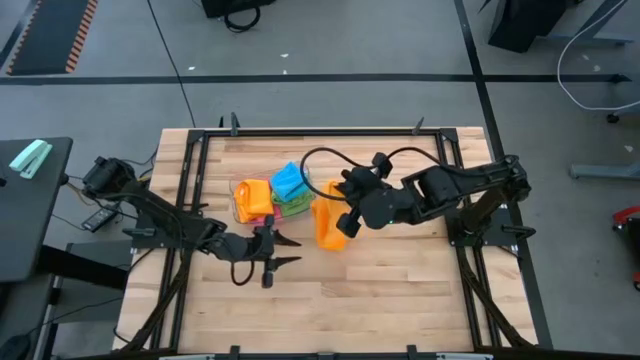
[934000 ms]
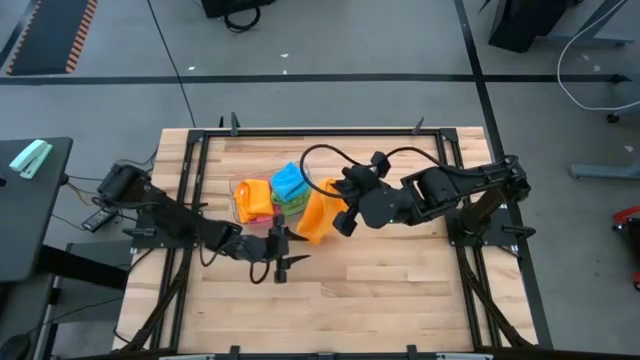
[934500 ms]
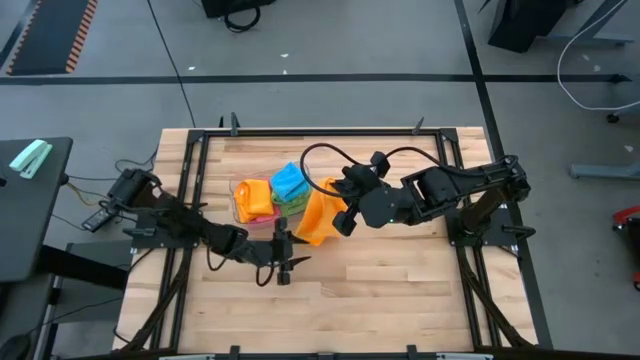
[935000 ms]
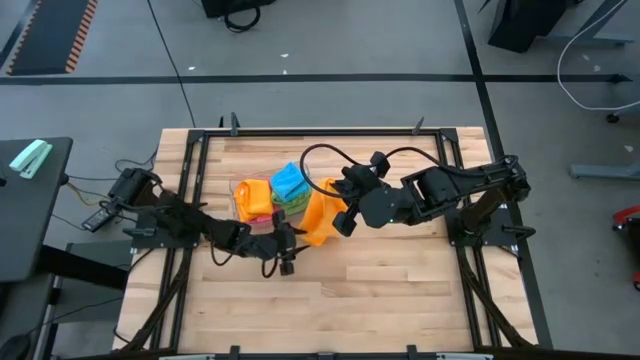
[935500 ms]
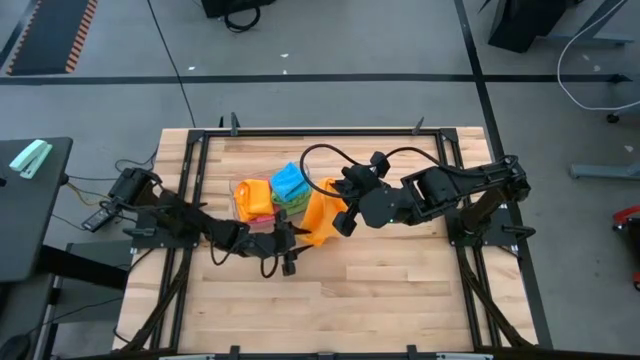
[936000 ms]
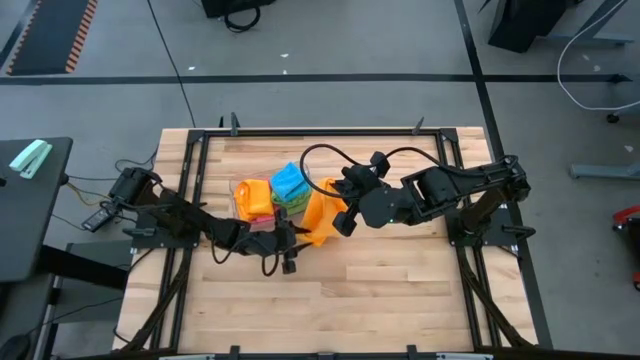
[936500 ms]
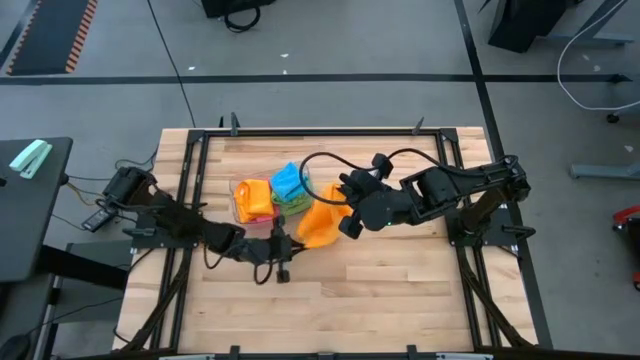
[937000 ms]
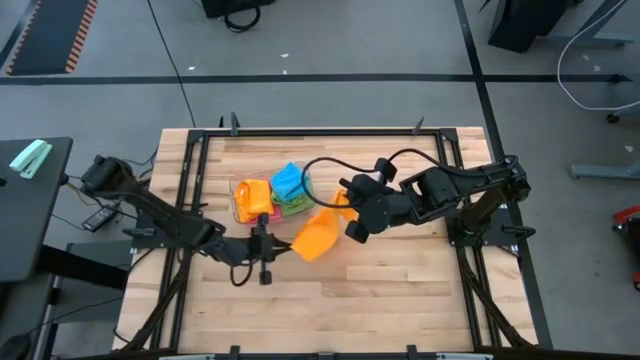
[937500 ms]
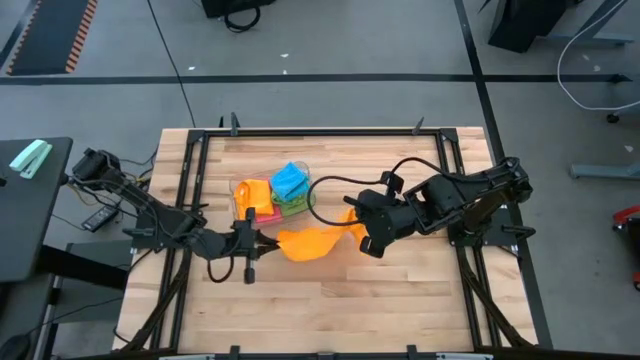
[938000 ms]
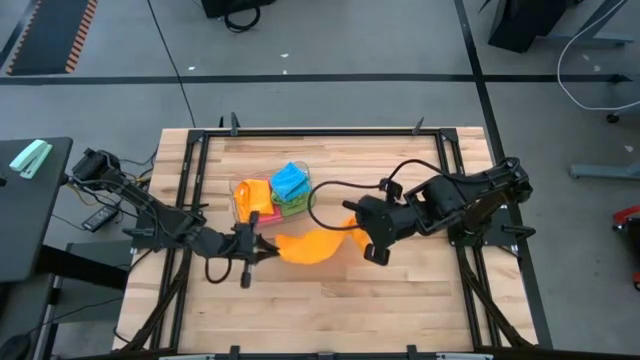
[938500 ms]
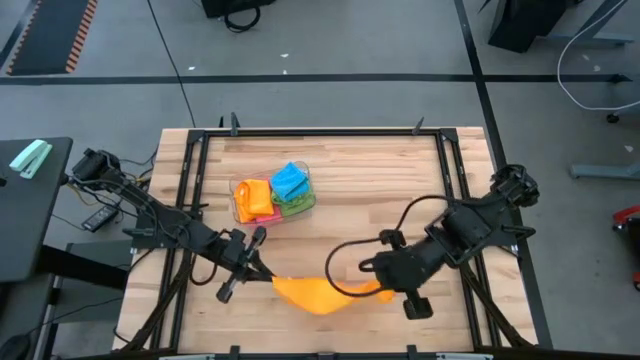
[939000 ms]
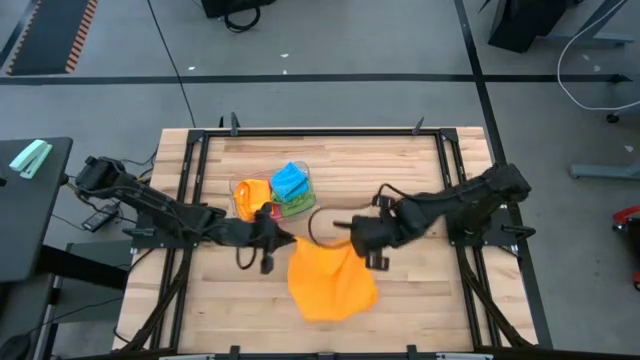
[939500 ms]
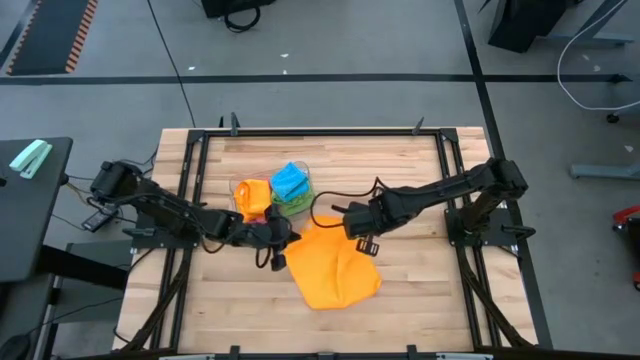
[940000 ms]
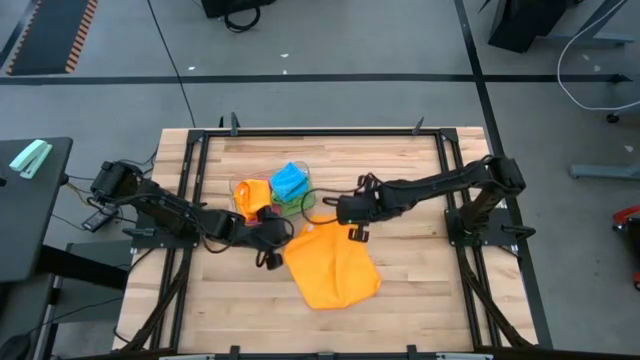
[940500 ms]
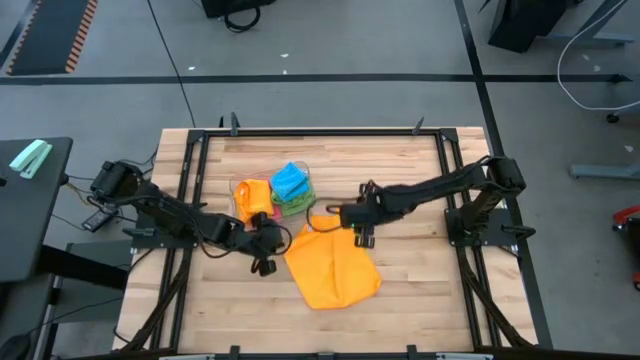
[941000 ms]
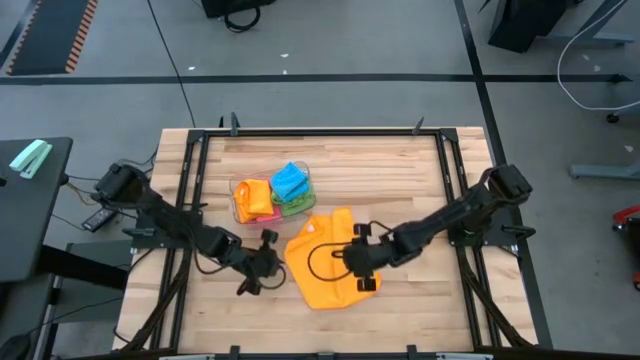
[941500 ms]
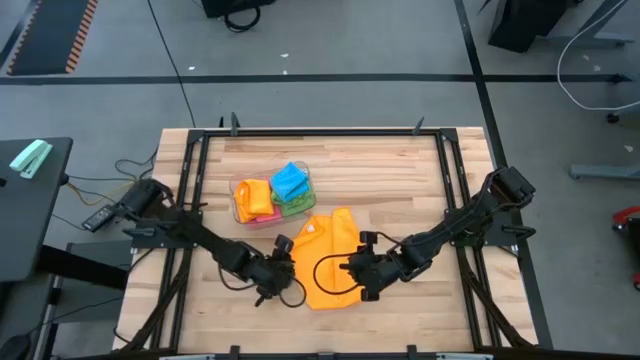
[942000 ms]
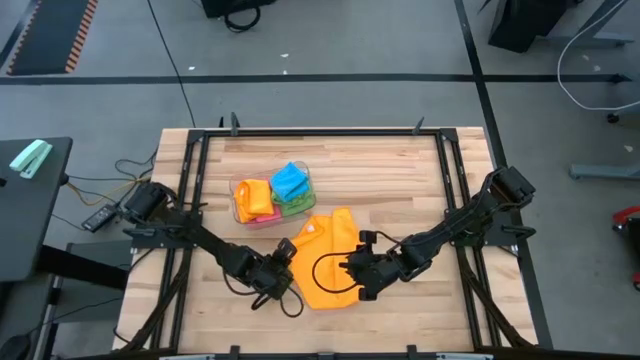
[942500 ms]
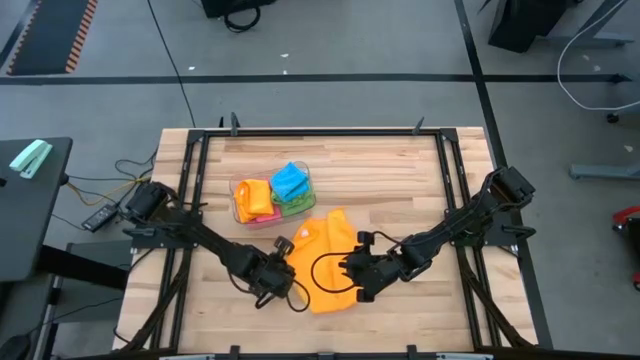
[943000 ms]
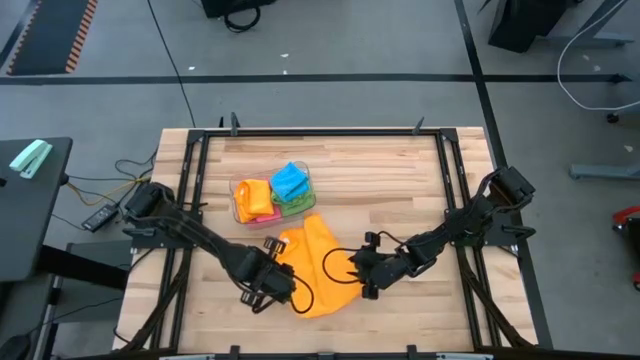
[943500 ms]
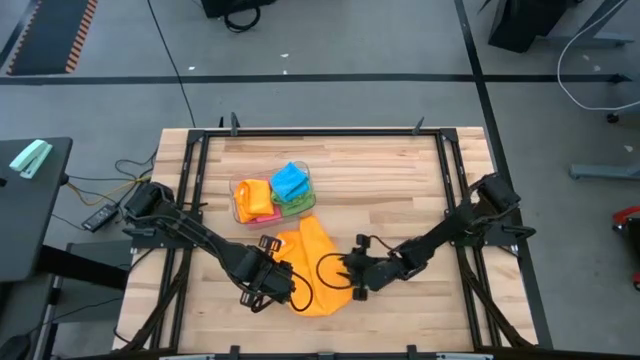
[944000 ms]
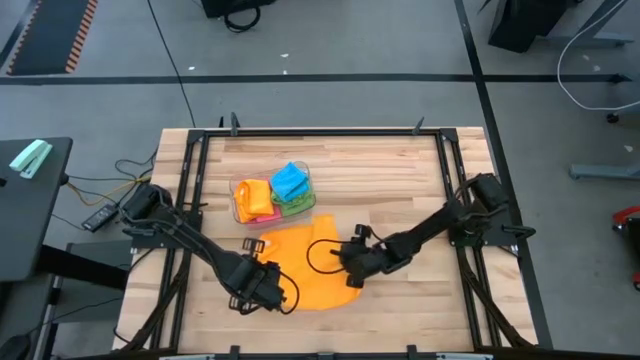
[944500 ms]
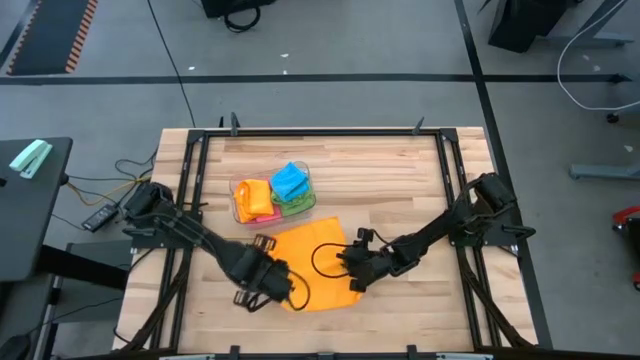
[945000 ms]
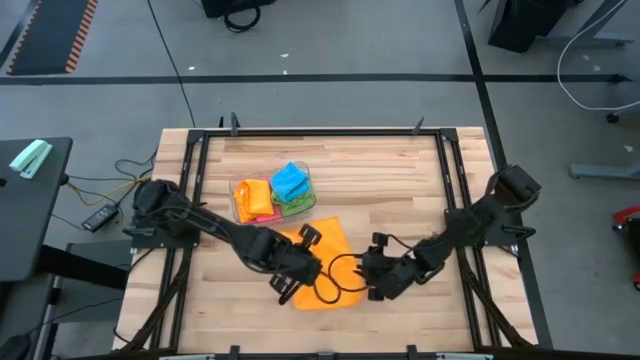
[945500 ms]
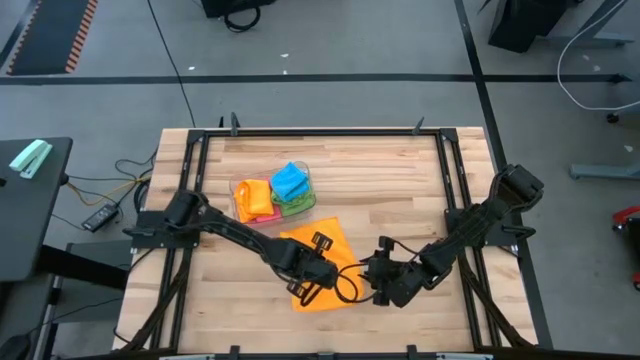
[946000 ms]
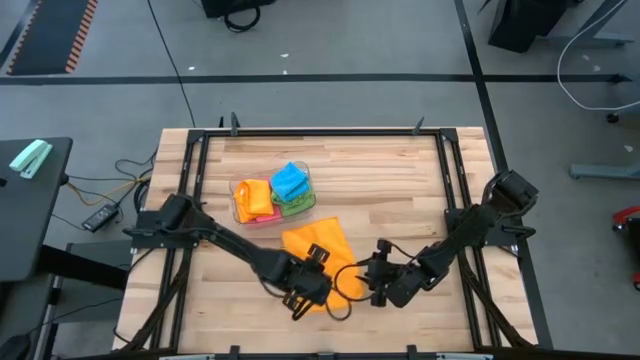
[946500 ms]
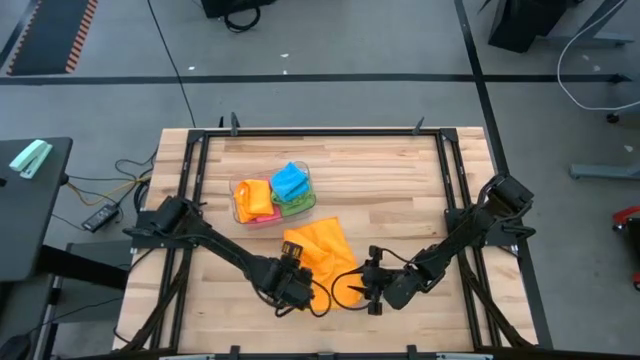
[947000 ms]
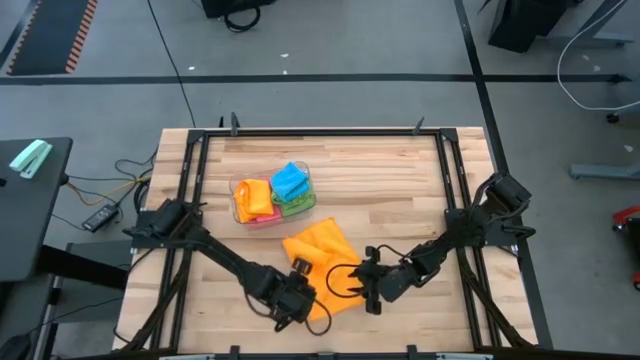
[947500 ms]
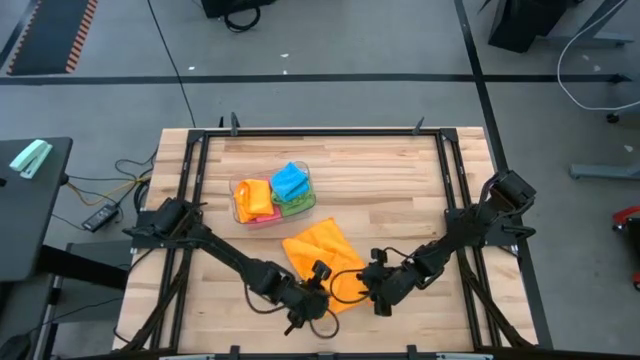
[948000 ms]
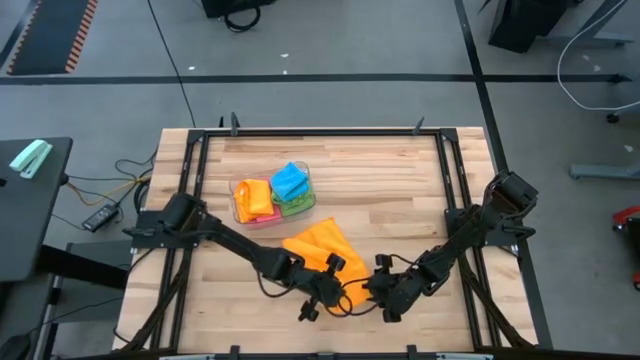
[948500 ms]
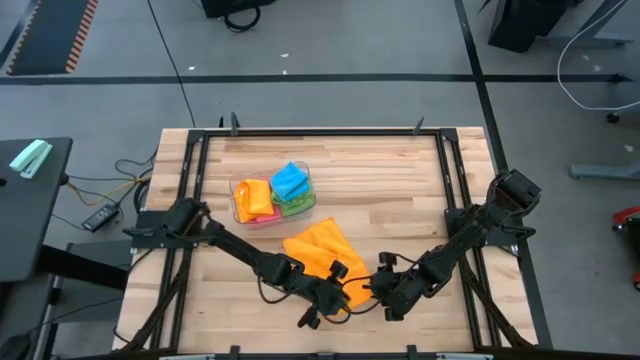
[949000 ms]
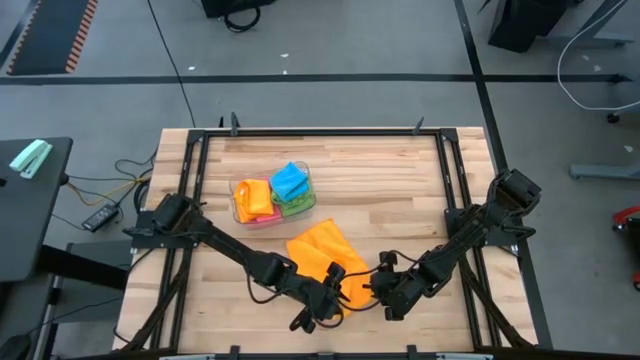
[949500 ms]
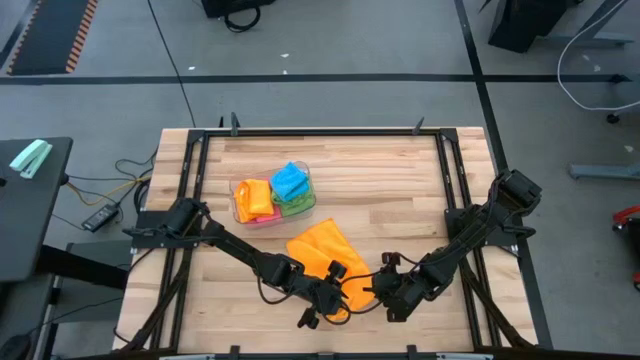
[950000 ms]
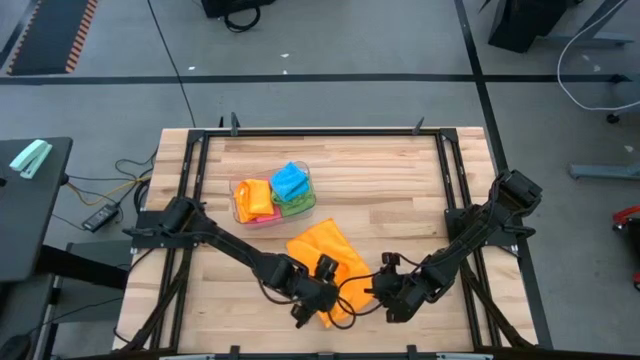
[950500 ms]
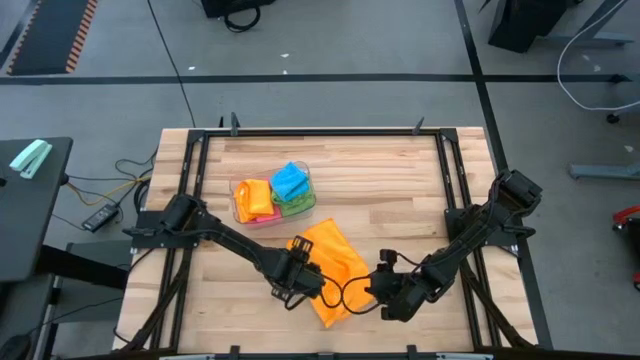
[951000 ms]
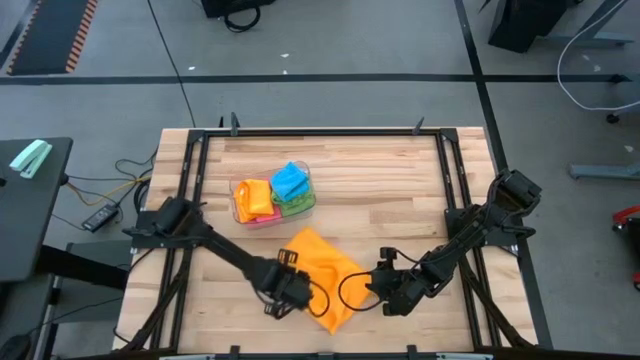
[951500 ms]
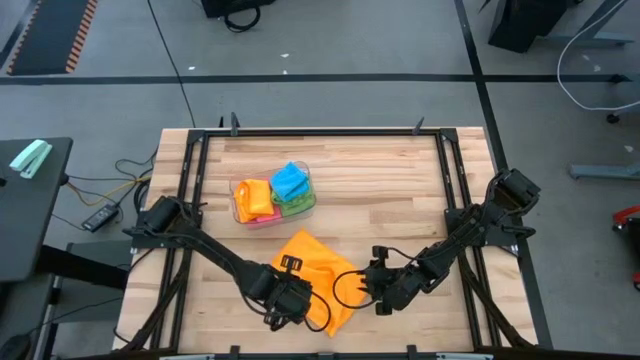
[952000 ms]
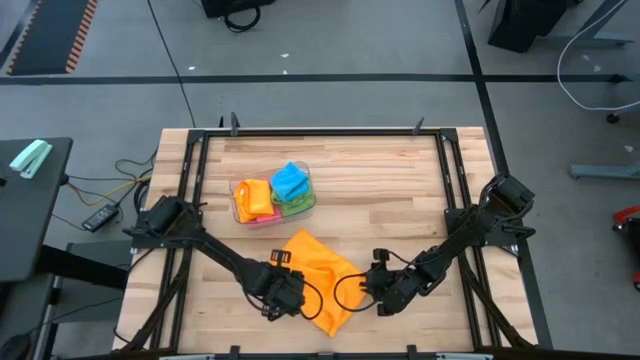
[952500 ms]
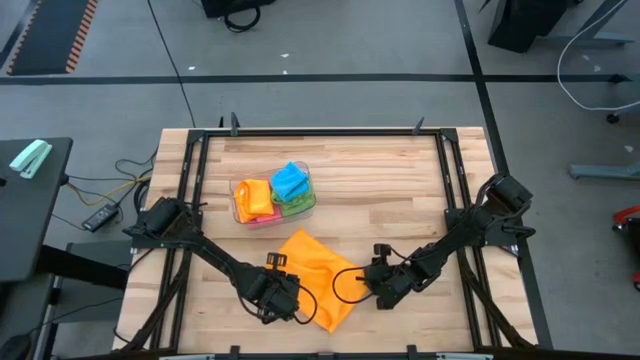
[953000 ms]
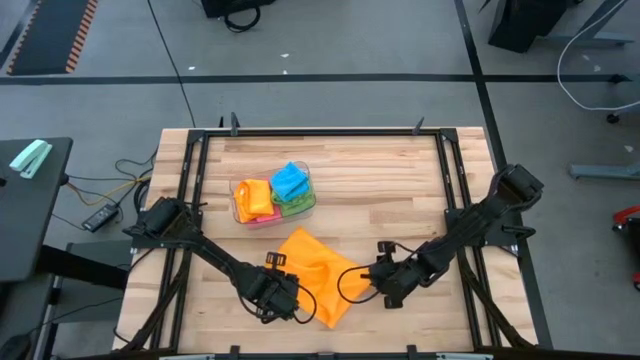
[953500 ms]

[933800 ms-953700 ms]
Task: Fold microfiber towels
Fold the yellow microfiber towel
